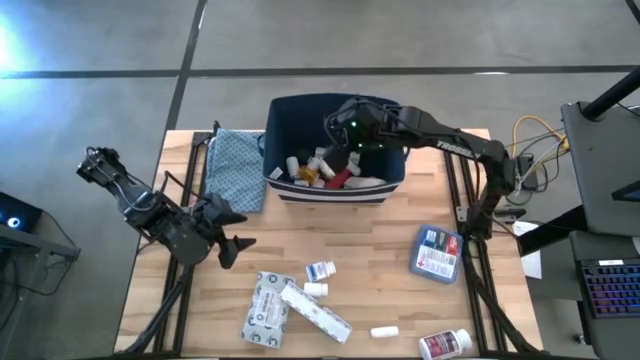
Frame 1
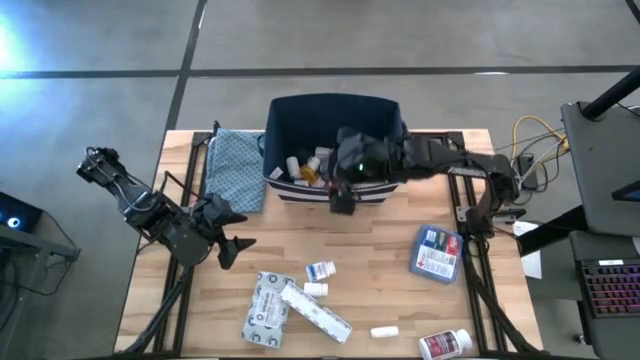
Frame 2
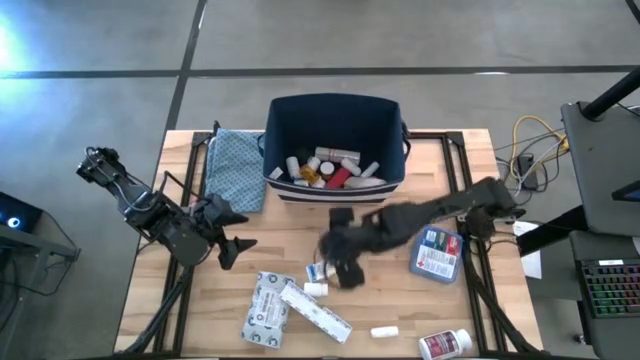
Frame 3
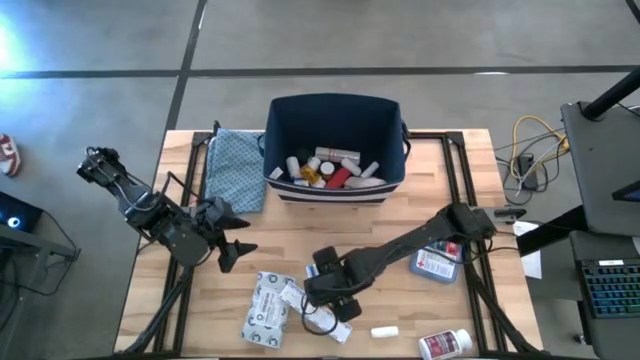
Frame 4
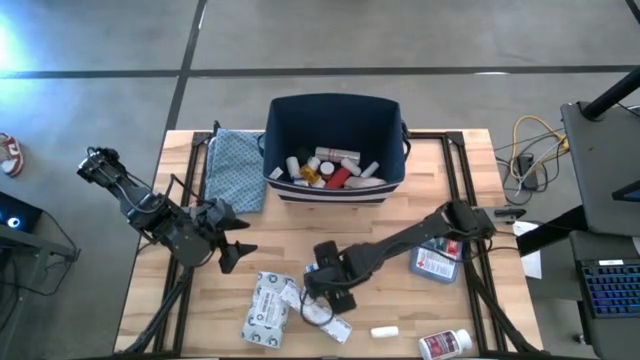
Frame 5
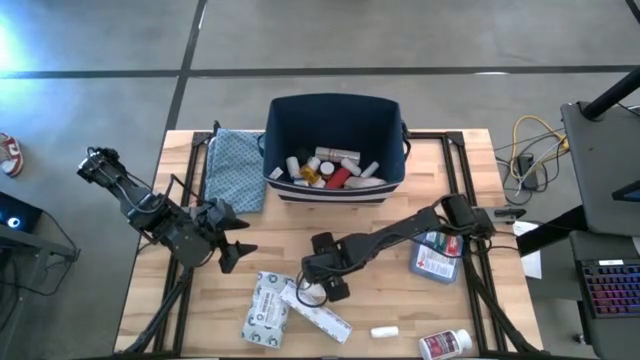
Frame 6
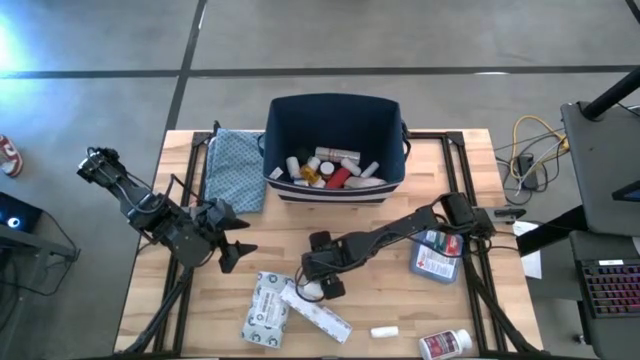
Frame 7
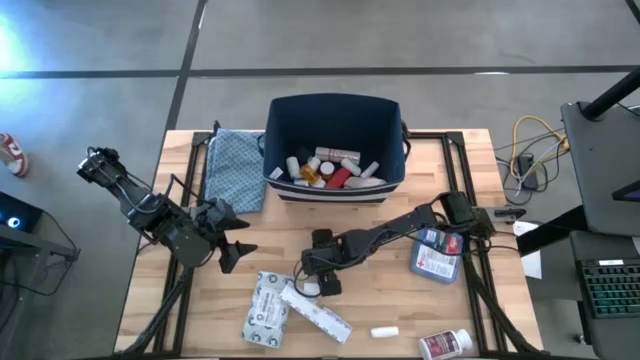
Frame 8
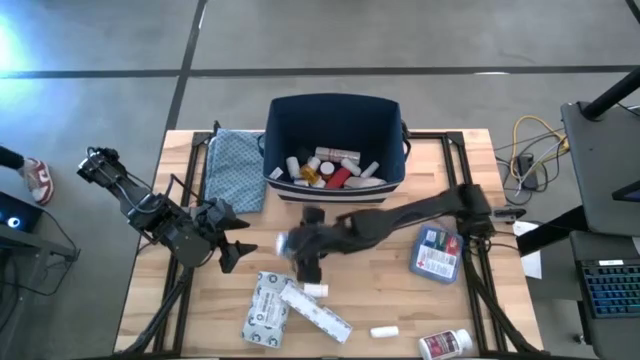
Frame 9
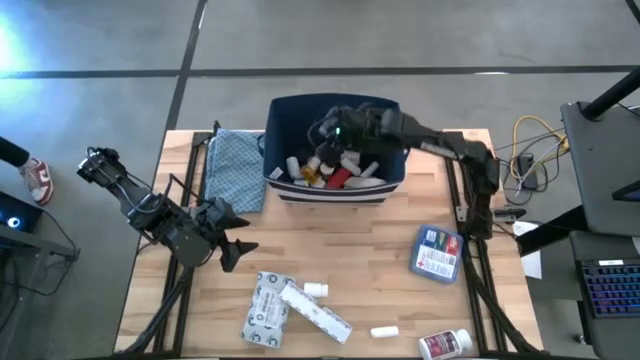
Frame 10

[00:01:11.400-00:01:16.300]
Task: Pick & place medical supplies in basket/bin
Put the white pill bottle into the bin

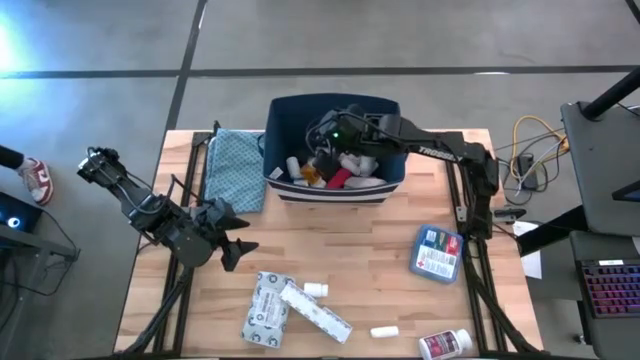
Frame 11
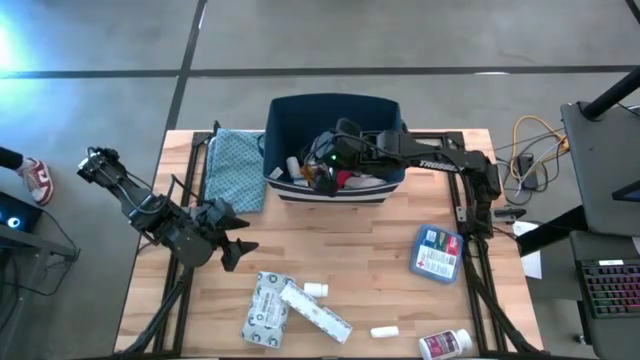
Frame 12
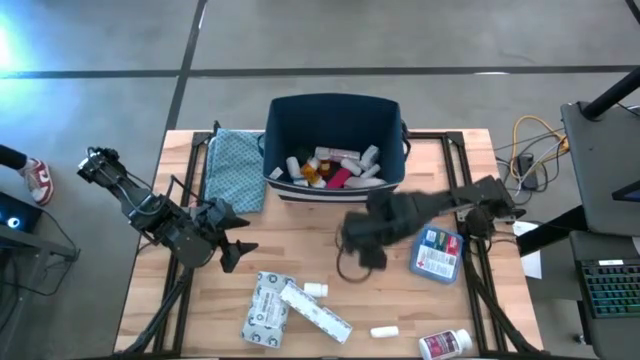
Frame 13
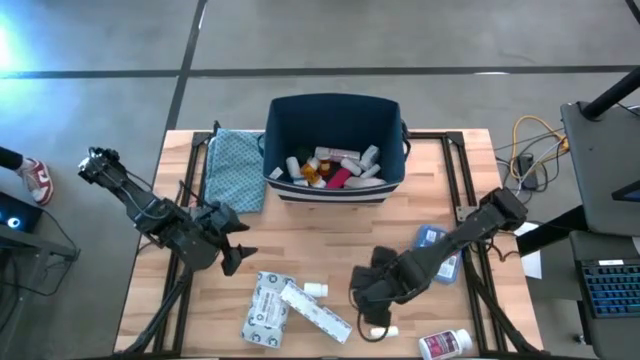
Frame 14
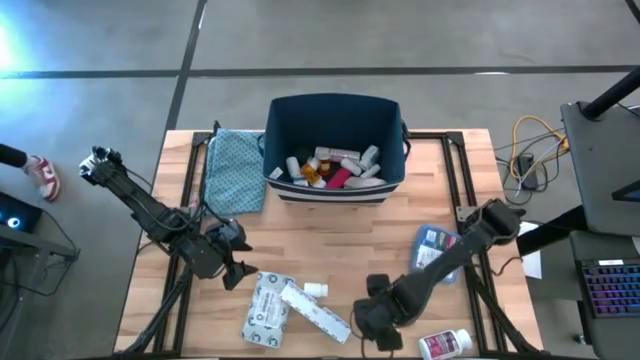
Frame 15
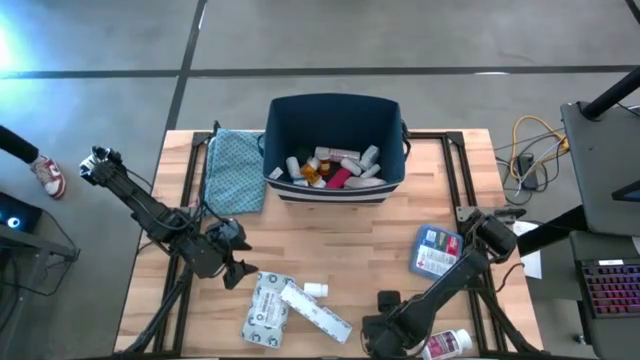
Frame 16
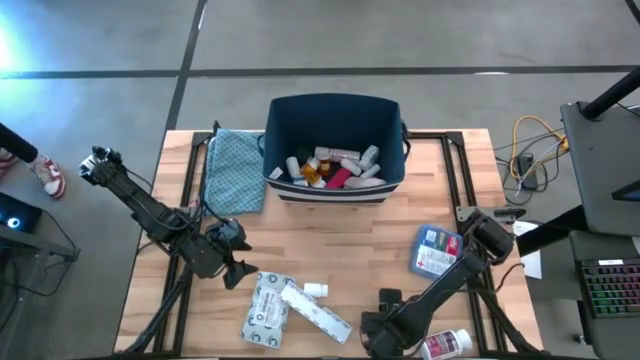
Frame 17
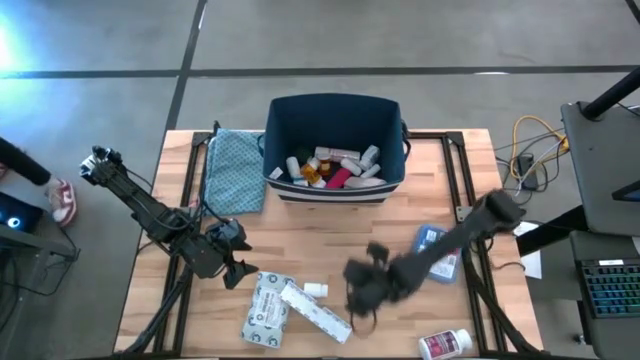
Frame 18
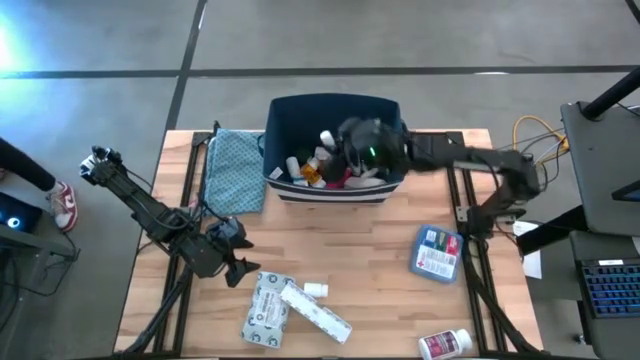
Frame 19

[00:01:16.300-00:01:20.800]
Put the white roll gauze into the bin

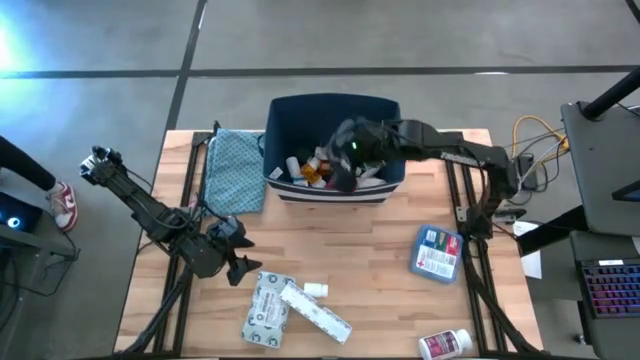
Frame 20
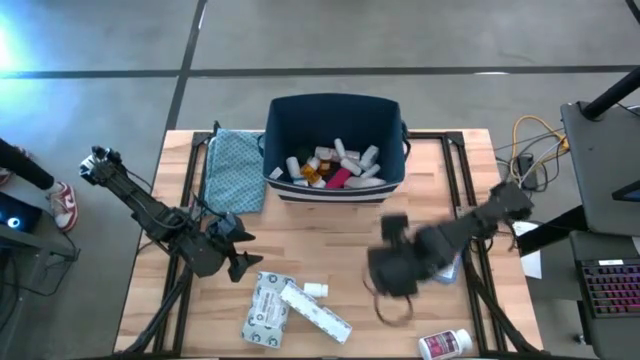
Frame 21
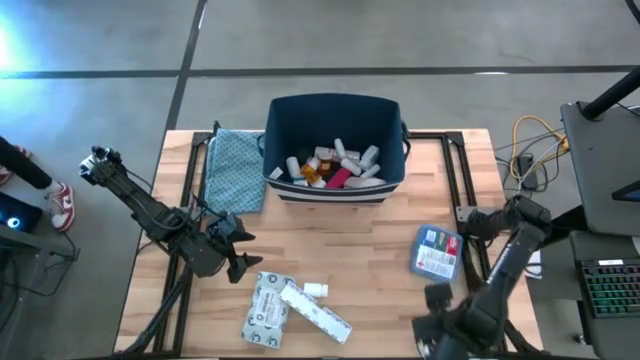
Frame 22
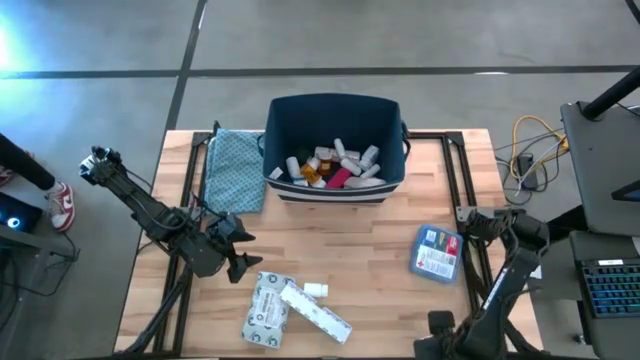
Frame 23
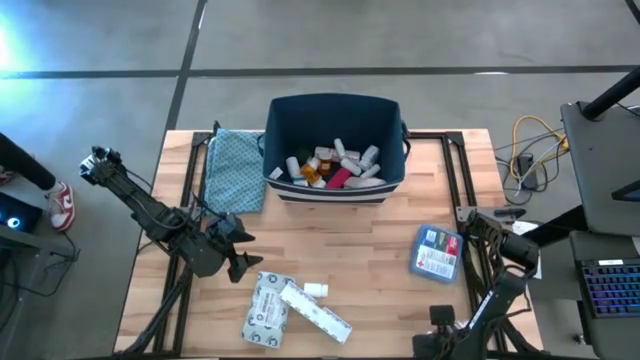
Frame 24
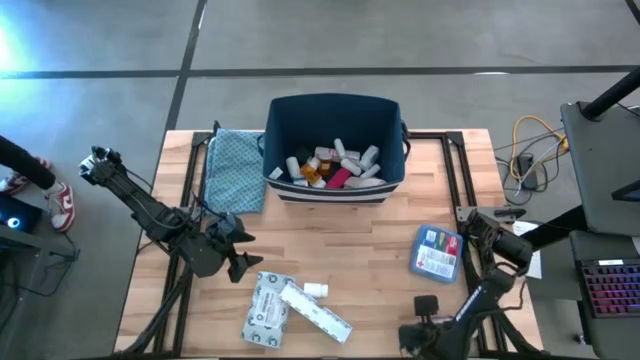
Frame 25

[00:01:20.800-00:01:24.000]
Put the white pill bottle into the bin

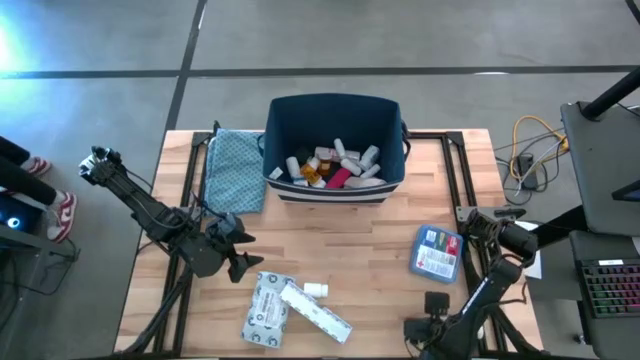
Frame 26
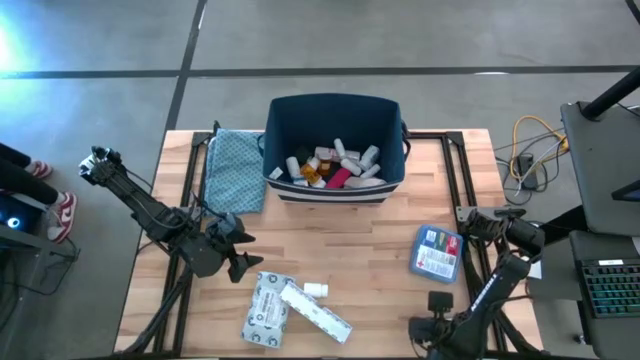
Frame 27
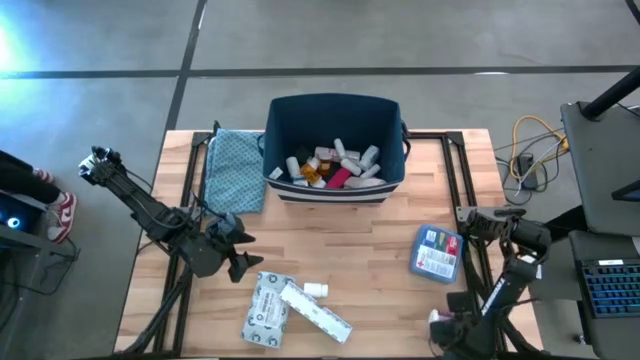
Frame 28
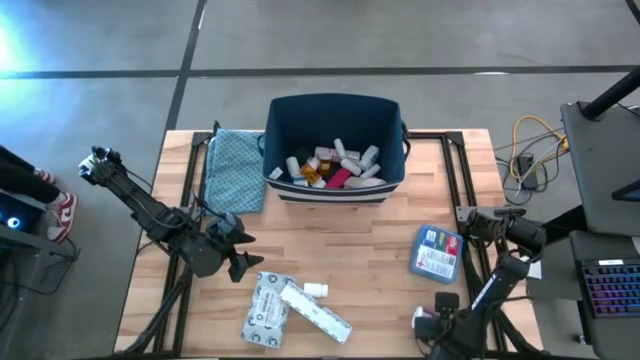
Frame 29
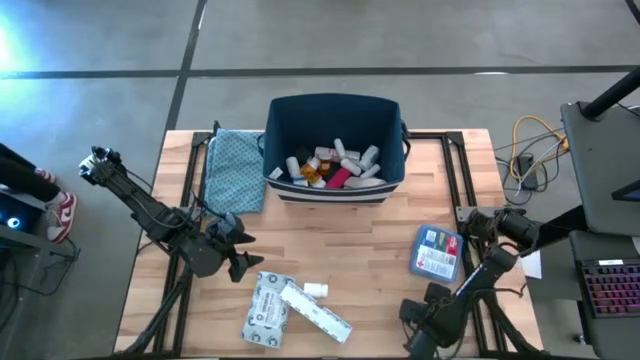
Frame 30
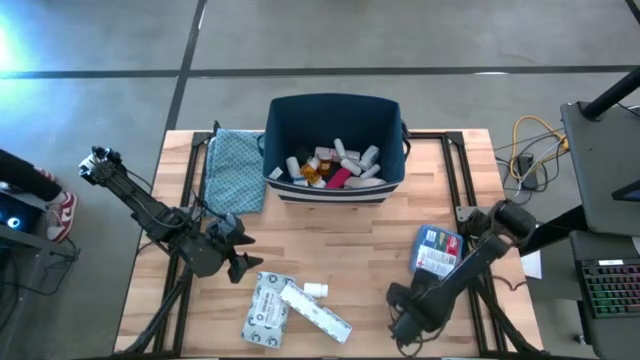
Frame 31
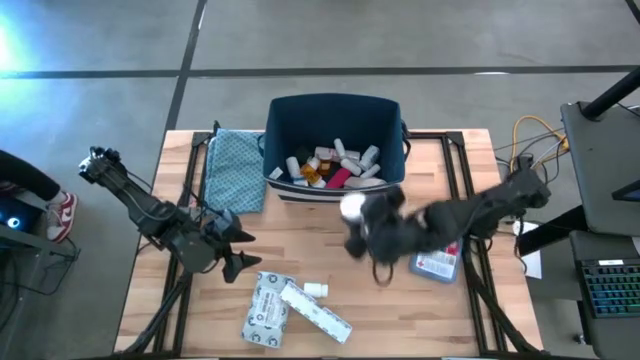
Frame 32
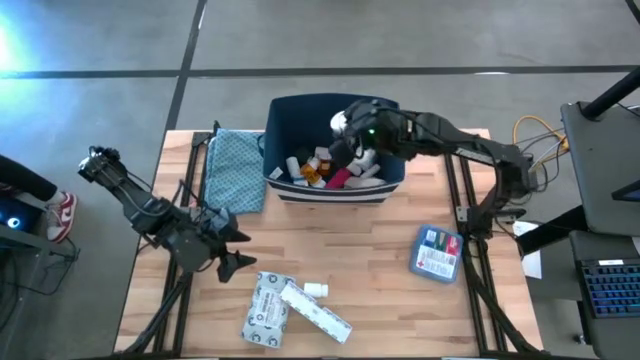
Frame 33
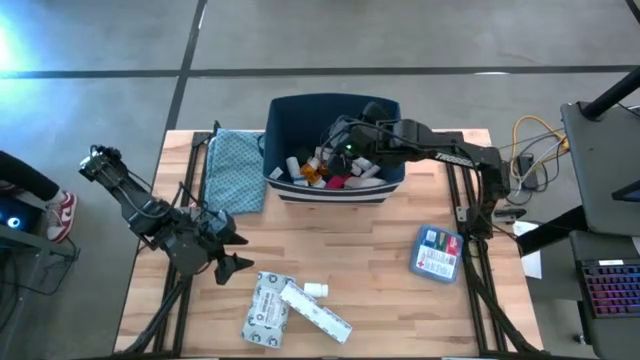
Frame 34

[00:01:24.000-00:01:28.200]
Put the white pill bottle into the bin

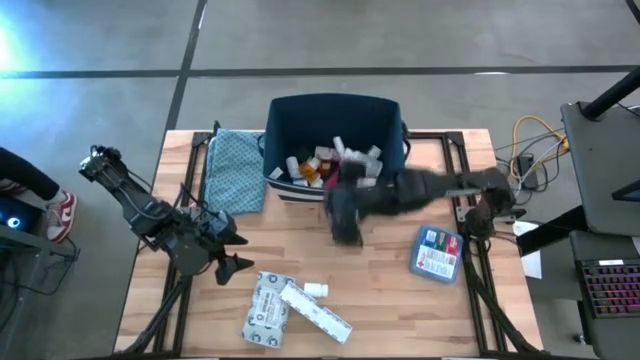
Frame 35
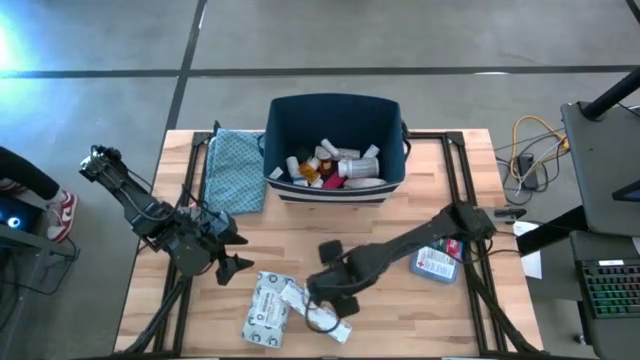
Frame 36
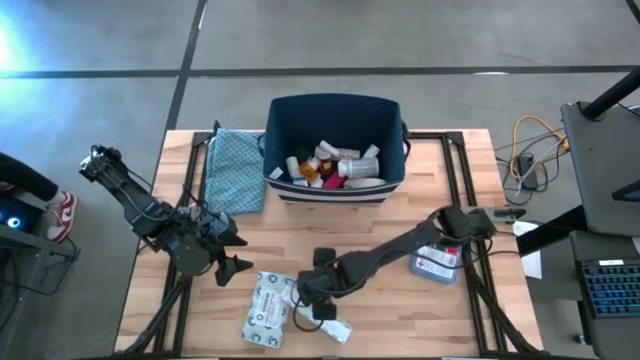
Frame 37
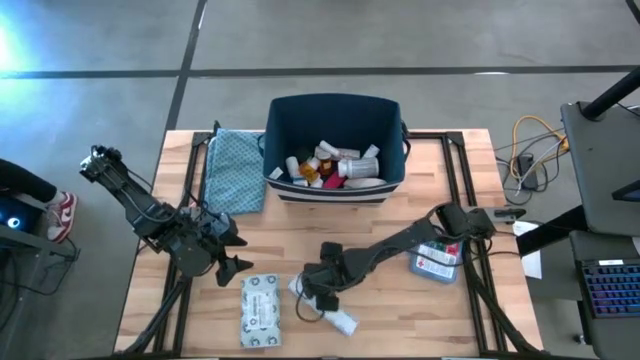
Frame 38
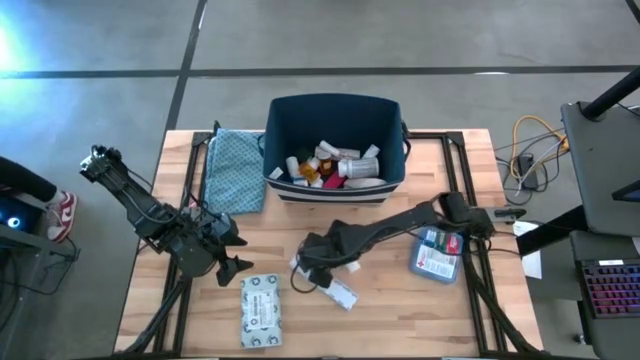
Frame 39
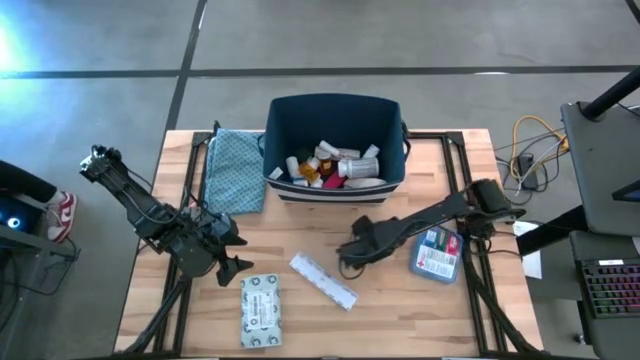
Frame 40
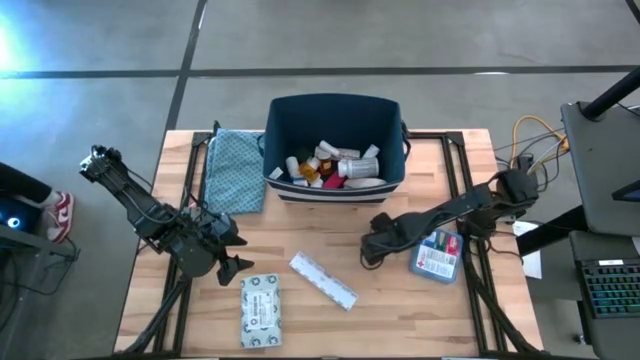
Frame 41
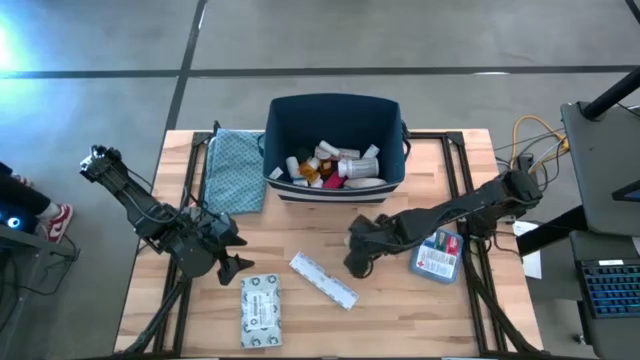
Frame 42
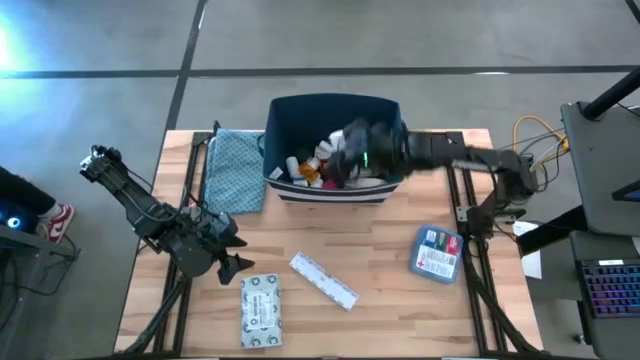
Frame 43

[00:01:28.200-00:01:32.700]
Put the white pill bottle into the bin
